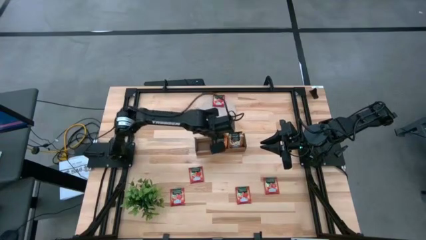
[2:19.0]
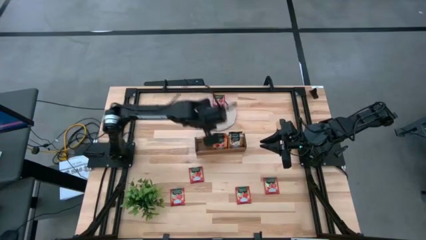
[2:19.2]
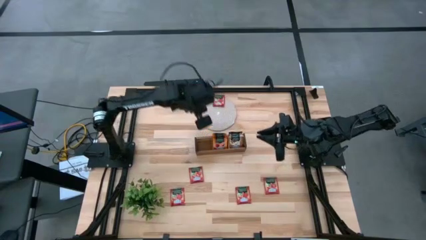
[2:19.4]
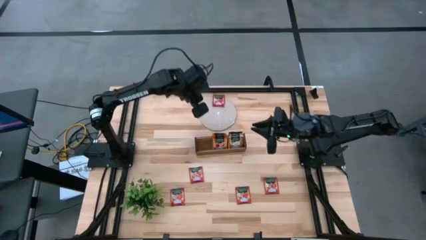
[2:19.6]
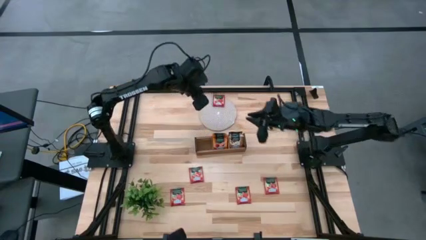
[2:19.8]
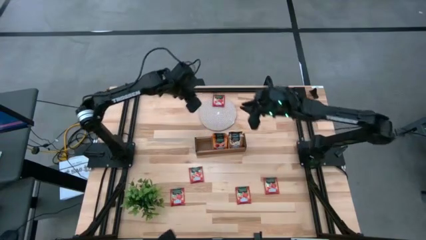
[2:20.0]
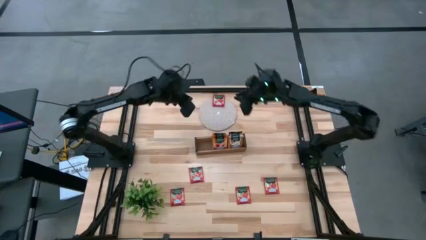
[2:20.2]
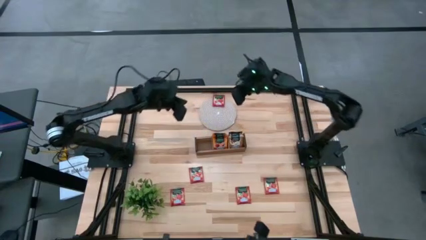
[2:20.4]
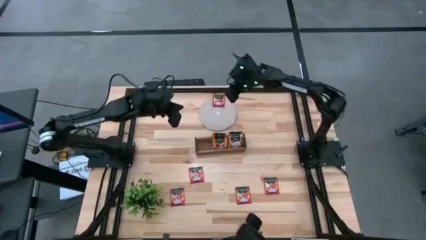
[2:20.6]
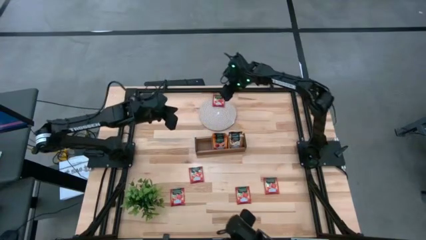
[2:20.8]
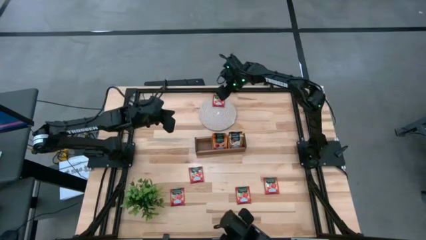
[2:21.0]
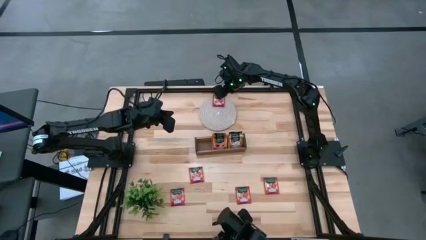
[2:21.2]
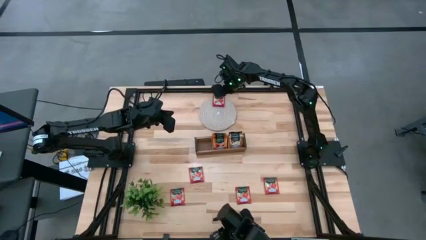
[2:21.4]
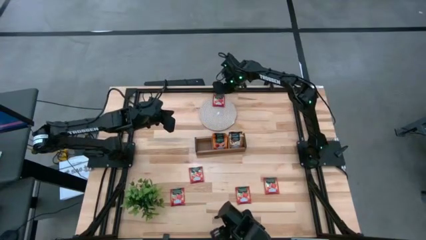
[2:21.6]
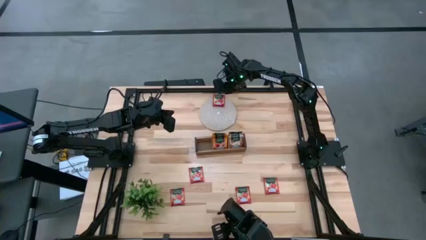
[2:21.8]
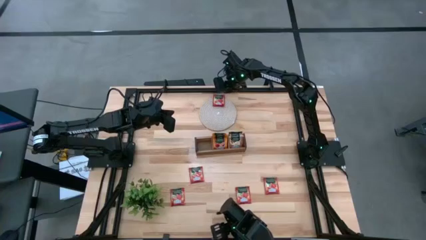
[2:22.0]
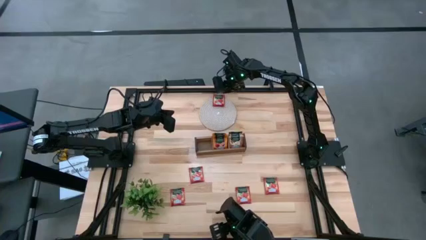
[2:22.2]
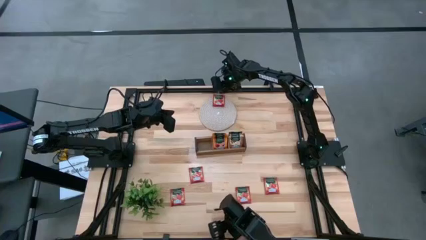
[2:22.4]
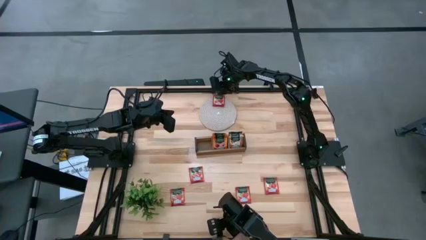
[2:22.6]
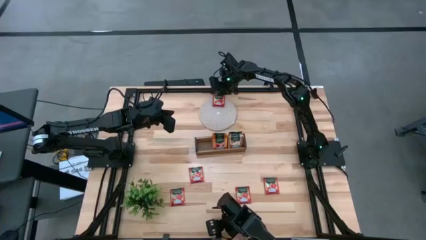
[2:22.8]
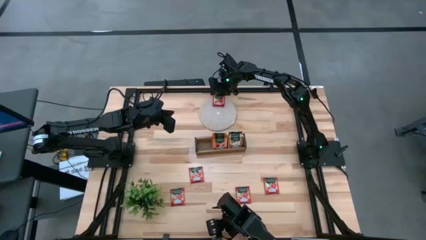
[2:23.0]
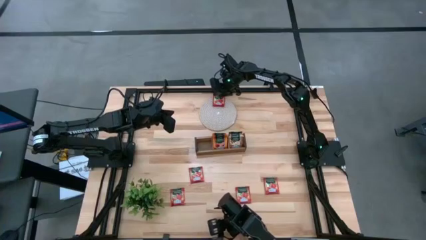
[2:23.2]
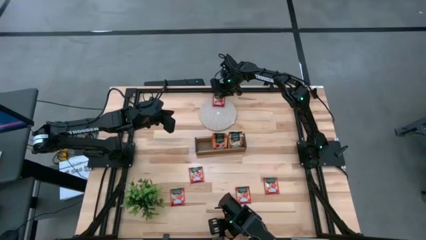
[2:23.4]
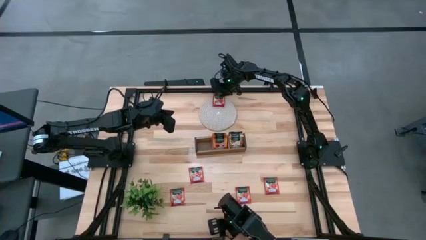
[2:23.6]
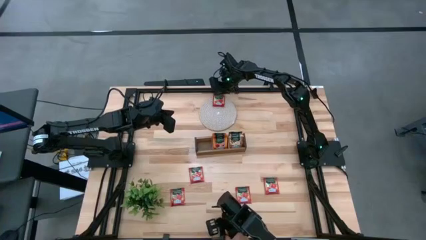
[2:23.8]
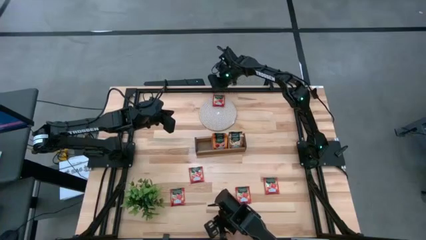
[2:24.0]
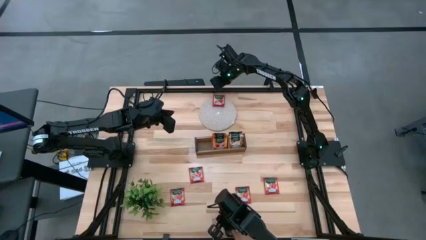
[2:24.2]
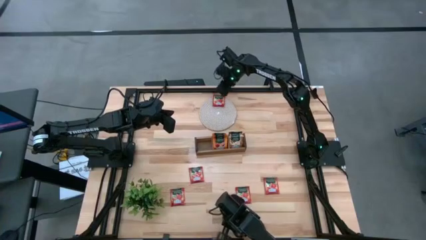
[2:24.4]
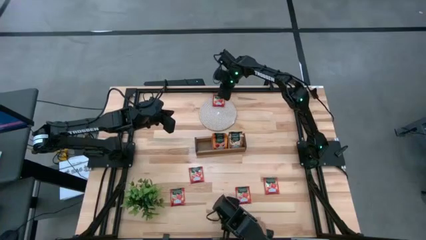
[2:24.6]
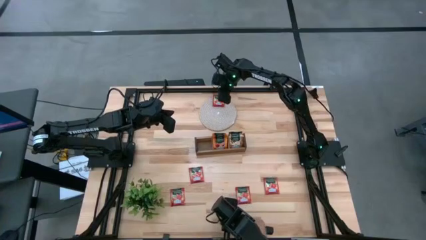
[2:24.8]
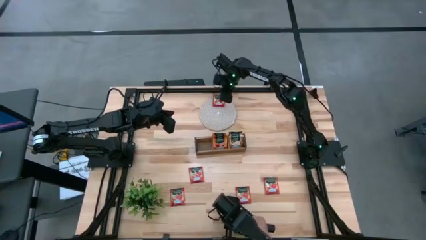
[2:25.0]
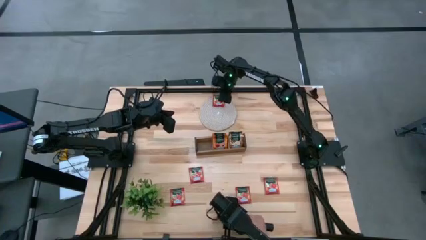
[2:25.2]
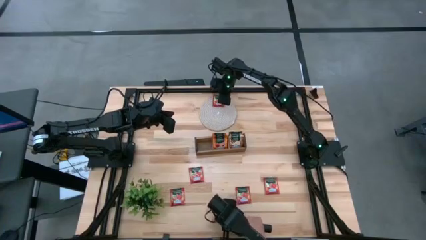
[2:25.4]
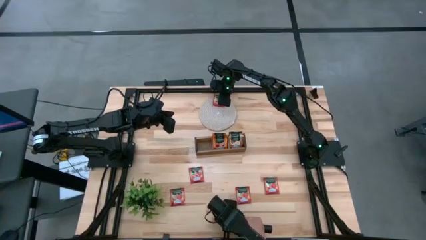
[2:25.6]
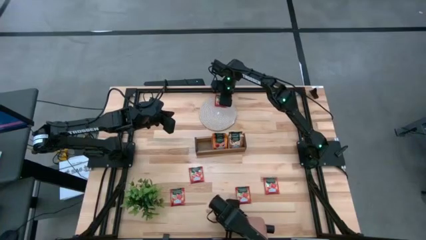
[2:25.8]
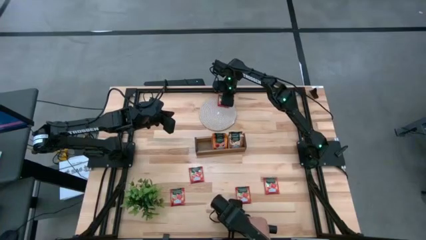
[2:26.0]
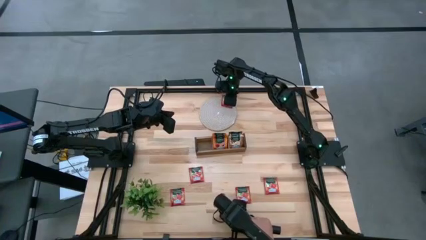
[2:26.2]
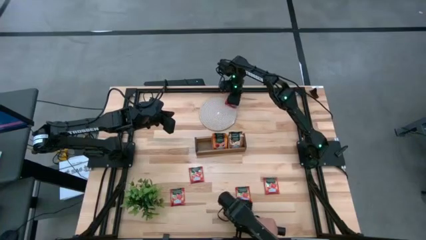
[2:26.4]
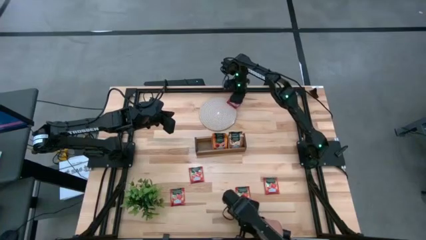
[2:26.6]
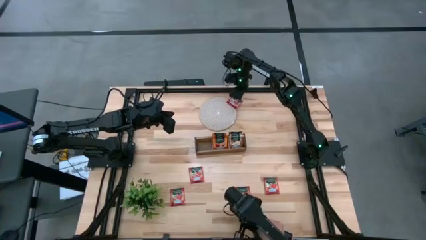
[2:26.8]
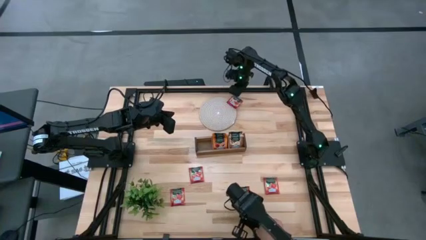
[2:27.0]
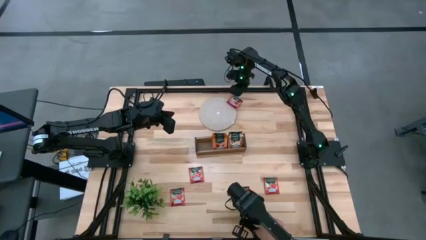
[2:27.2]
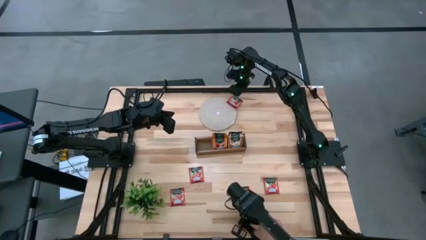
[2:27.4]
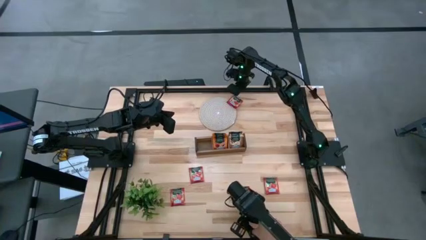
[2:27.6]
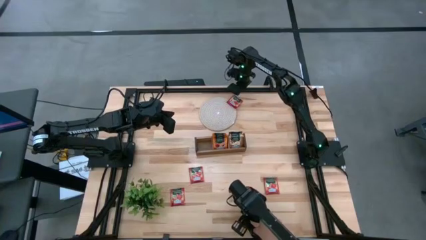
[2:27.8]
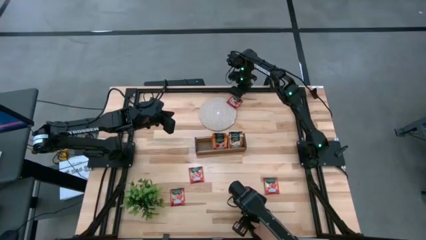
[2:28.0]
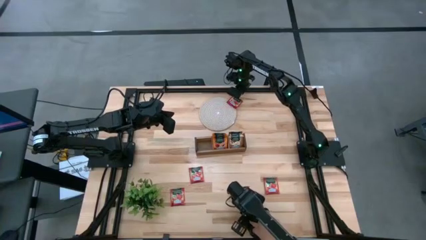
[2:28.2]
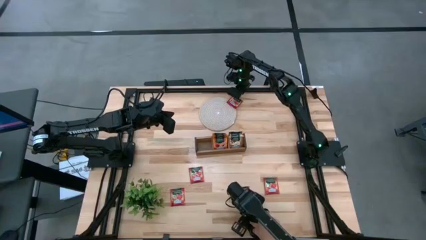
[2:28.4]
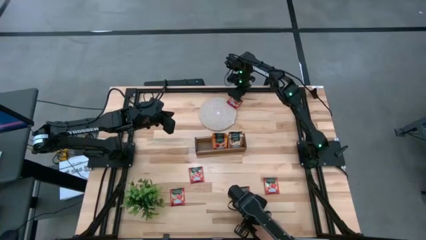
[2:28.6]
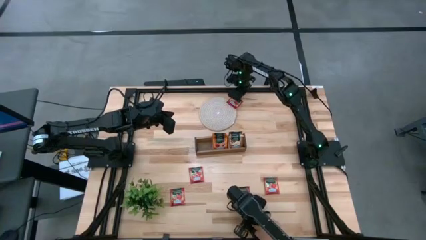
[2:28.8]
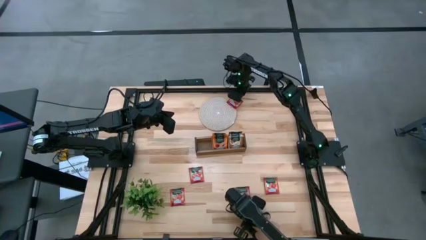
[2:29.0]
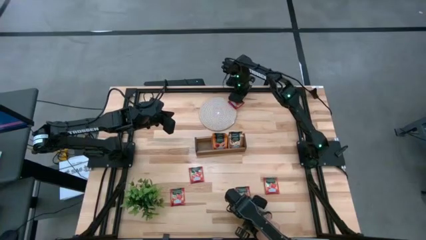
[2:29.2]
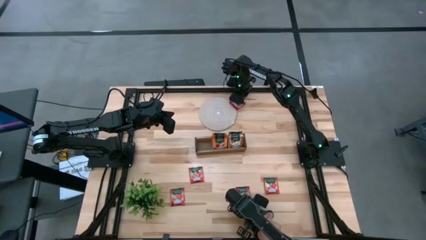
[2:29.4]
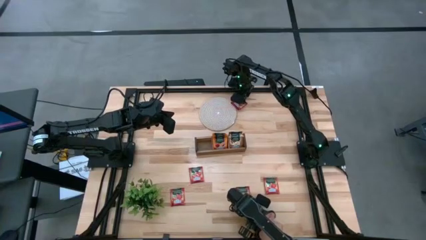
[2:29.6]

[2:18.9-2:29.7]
Task: Pick & Place Tea
Put the red tea bag into the left section of the wooden organizer
